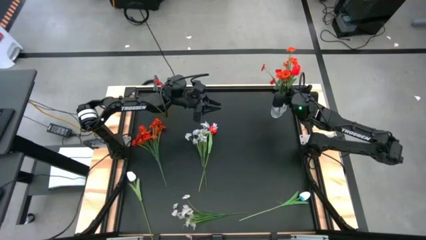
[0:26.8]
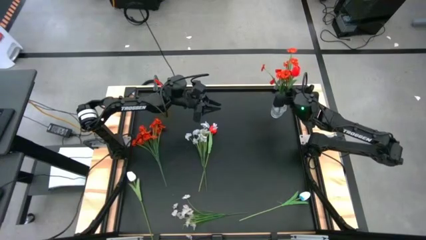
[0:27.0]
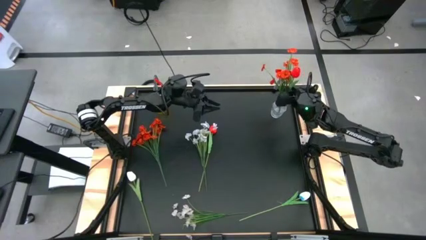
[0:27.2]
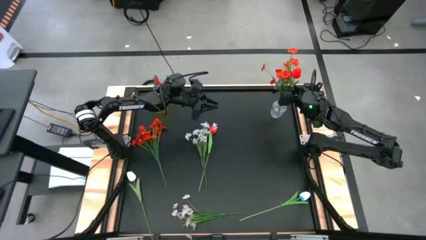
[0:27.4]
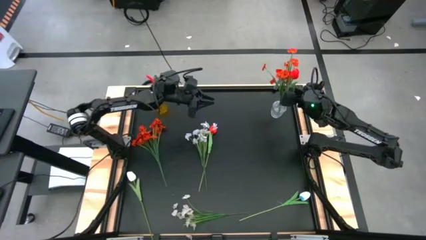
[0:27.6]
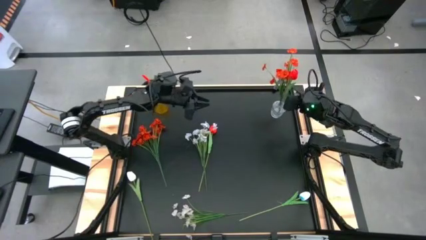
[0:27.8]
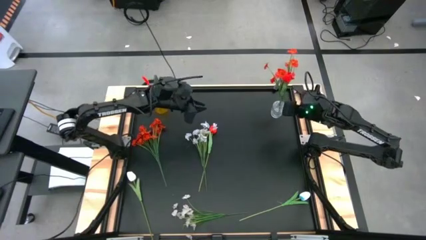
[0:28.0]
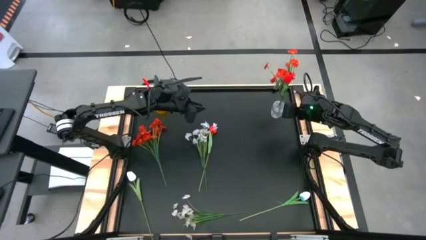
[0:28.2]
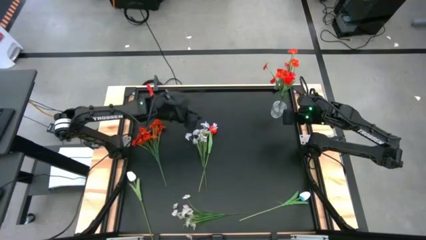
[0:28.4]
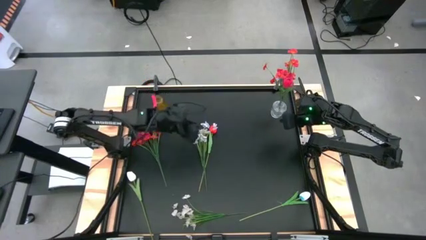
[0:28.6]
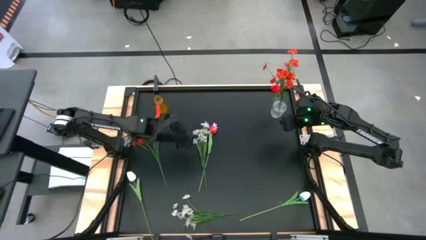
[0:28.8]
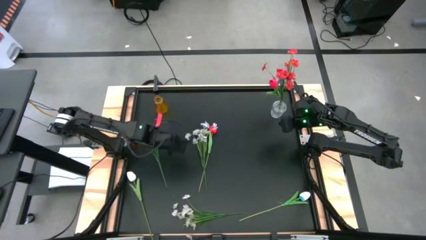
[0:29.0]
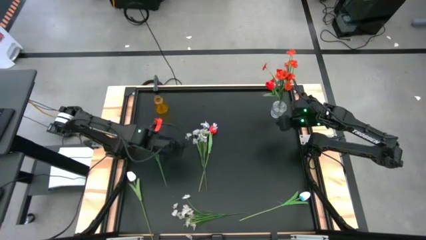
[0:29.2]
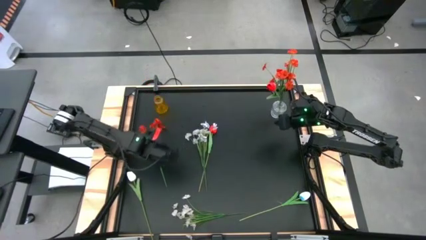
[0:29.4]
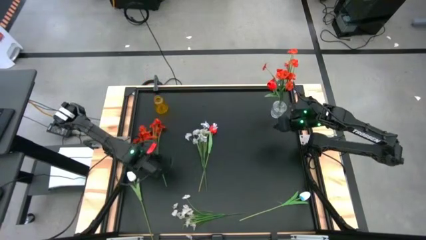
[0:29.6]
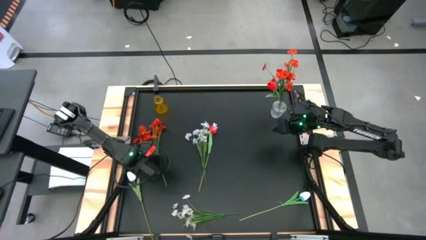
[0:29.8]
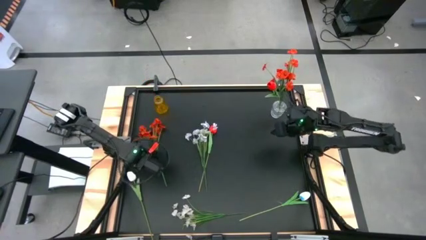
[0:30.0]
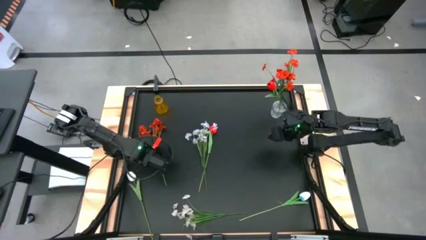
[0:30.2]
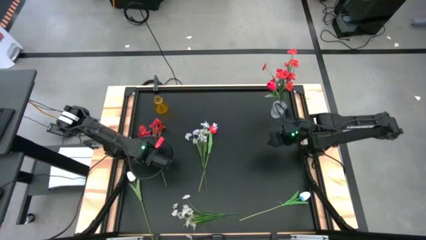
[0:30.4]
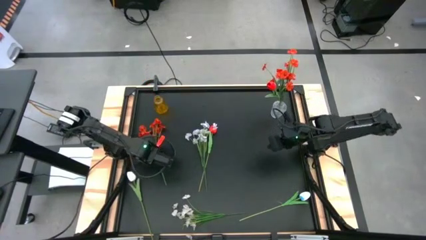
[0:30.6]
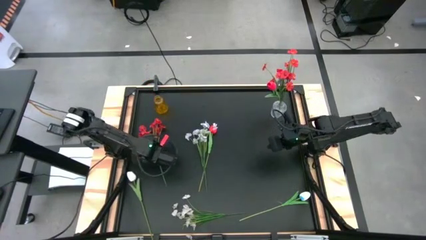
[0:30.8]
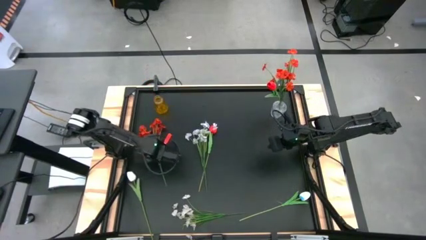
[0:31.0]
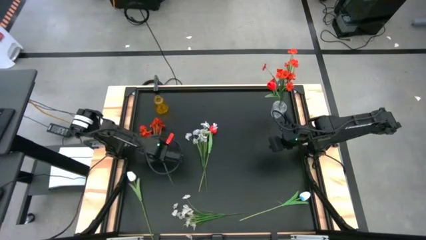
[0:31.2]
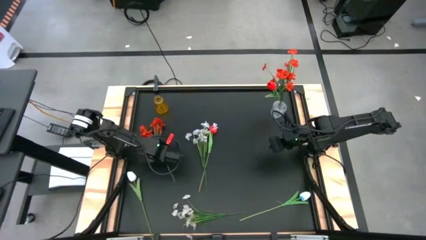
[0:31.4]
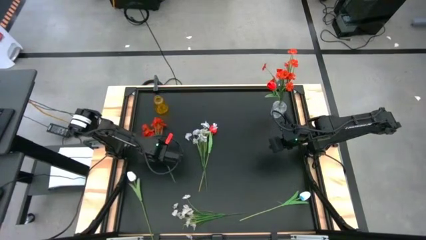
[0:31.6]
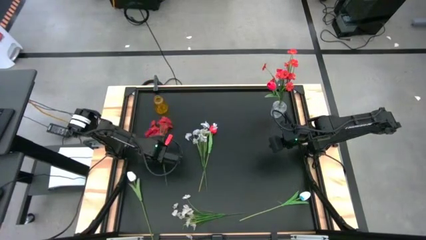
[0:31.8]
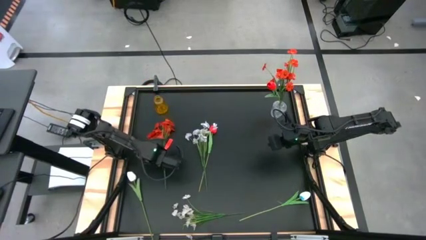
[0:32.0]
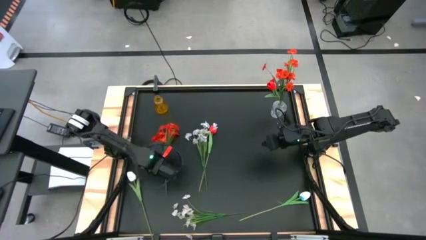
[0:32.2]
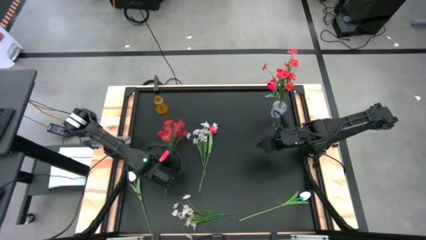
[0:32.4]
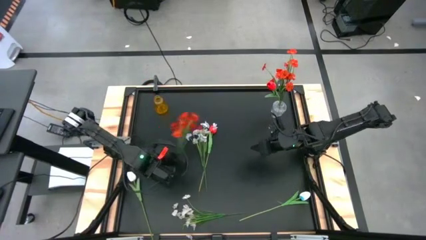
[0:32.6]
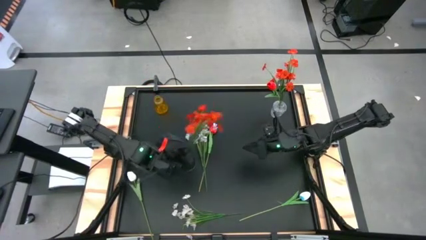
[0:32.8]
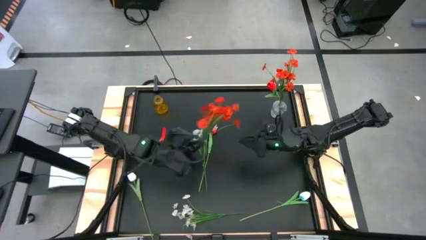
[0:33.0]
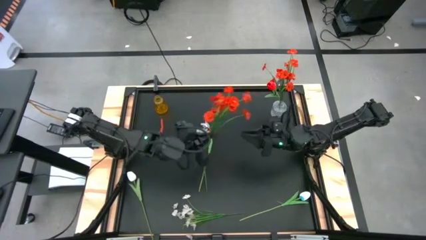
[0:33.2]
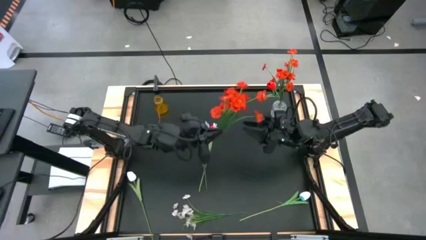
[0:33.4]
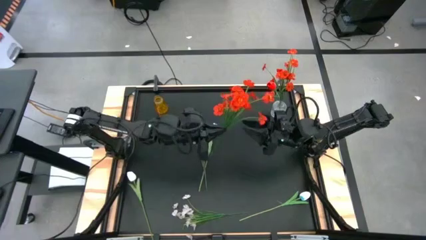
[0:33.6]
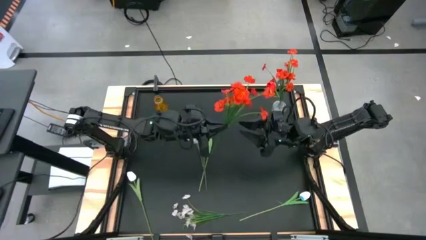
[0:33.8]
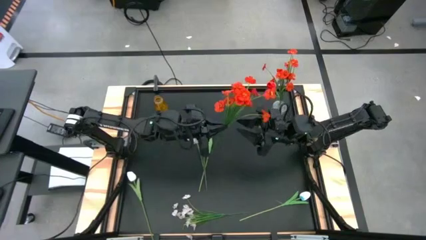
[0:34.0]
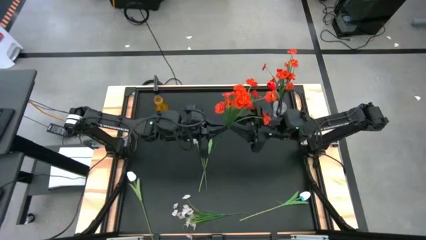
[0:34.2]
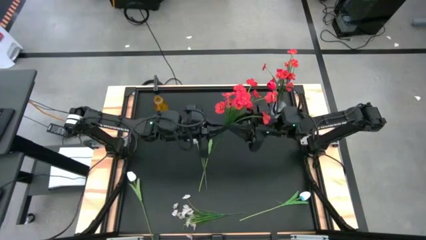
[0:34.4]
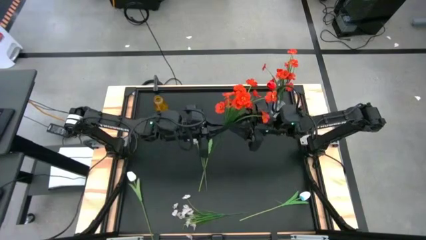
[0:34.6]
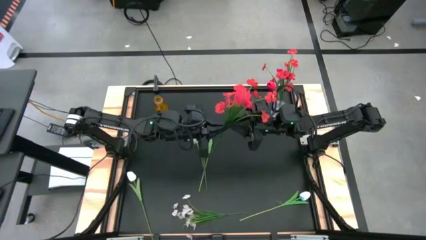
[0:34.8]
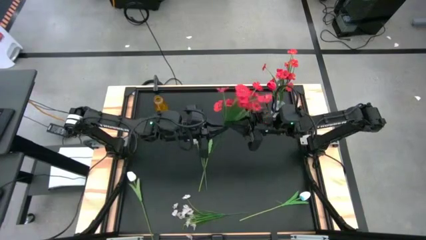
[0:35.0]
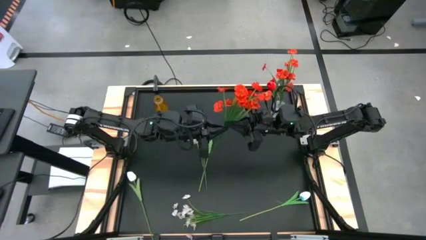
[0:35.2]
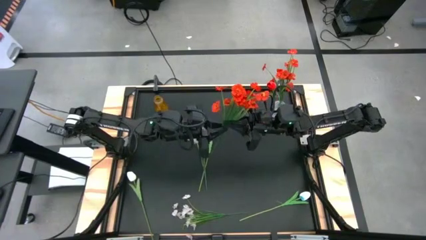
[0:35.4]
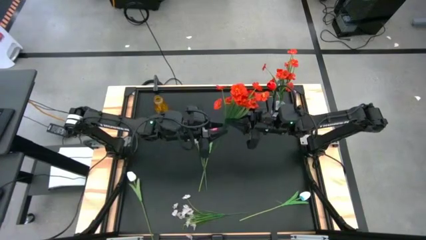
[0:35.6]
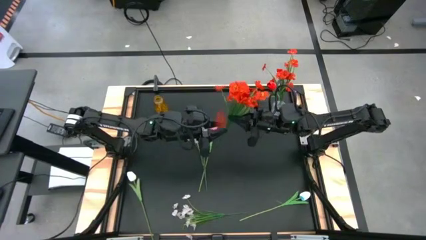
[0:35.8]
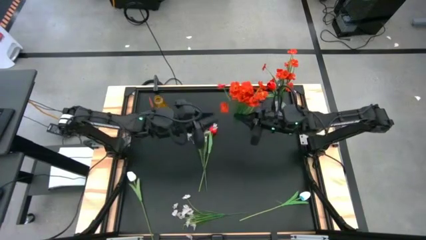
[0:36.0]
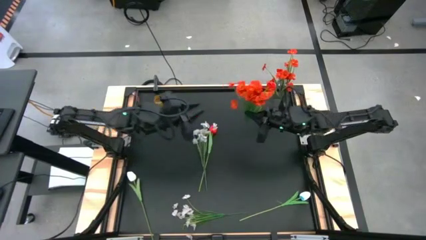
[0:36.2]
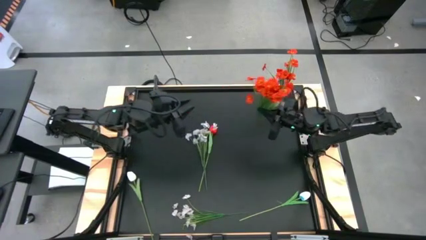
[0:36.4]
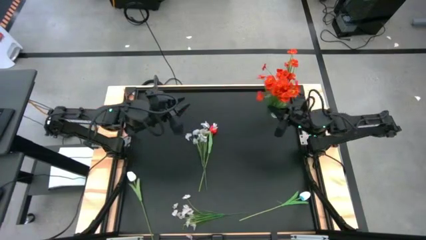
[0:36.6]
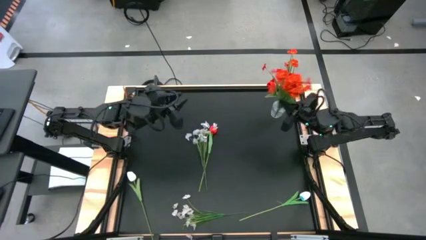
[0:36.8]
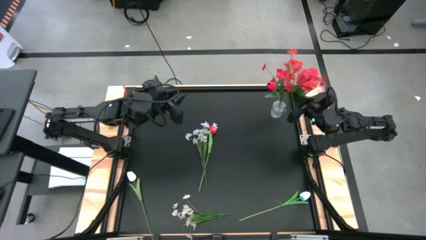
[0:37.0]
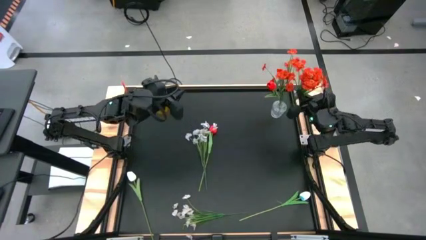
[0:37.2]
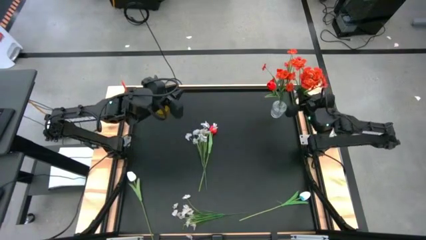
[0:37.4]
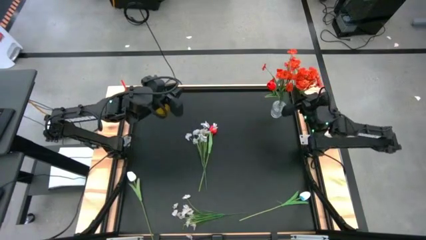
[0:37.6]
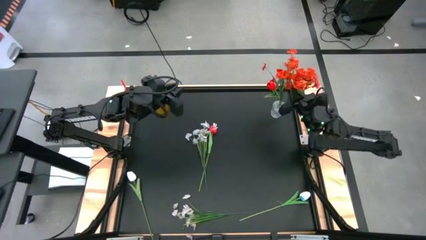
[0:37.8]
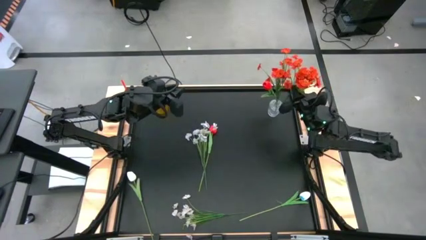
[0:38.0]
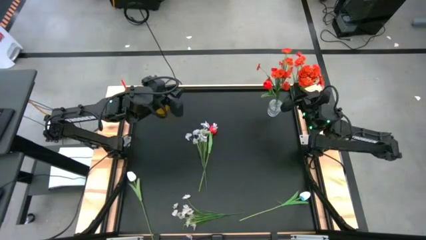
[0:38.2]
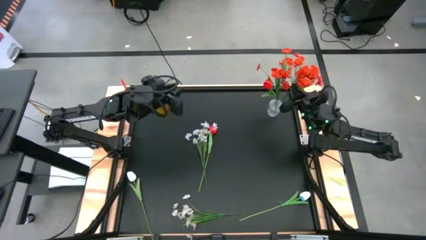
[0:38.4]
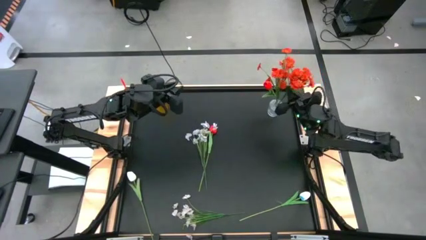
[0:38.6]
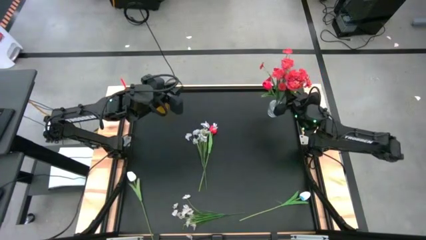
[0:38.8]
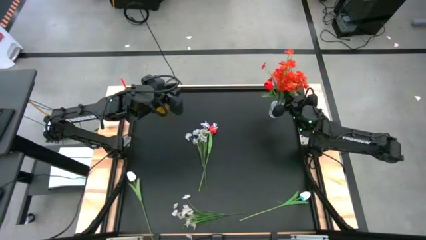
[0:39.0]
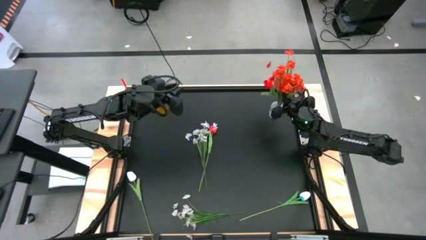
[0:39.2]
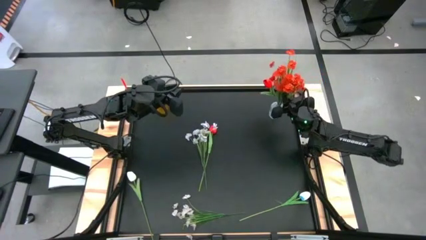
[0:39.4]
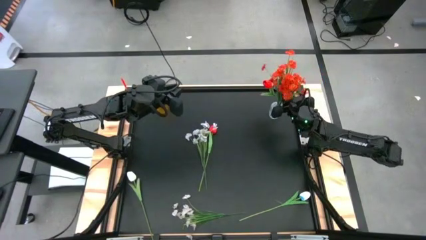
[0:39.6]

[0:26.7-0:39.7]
Task: Sort flowers into vase by color
Put the red flower into the transparent vase
